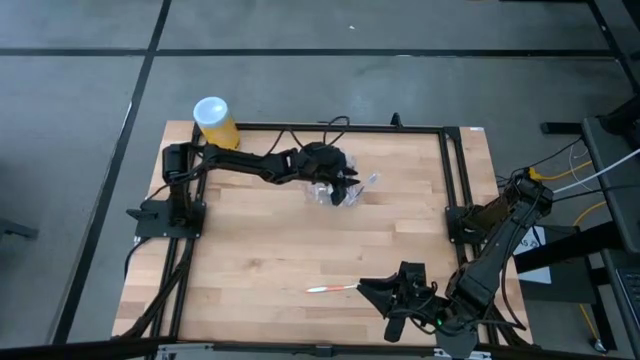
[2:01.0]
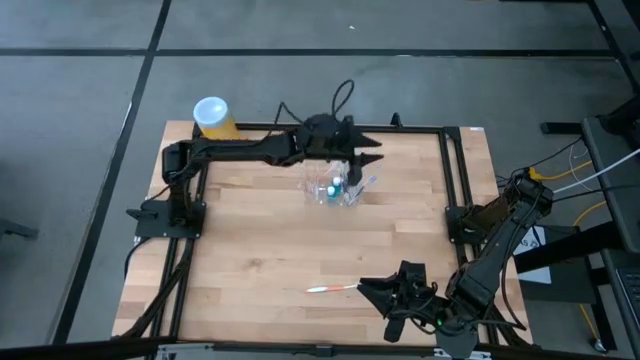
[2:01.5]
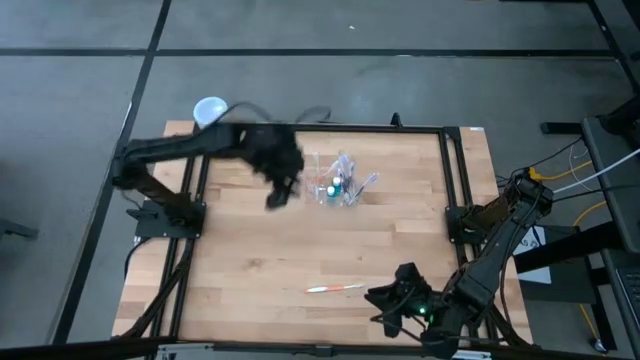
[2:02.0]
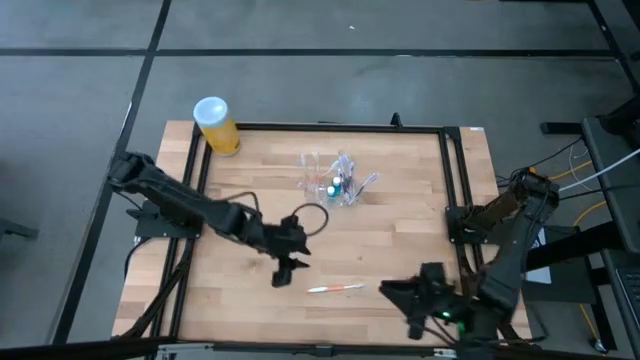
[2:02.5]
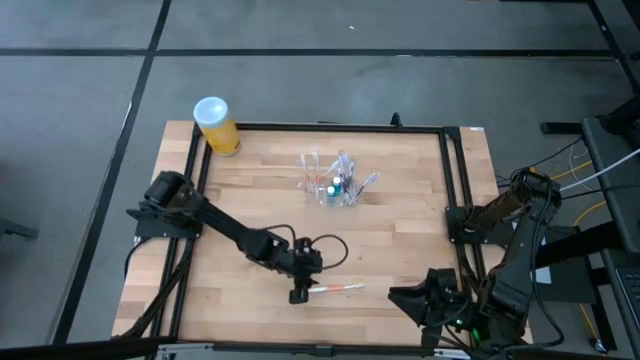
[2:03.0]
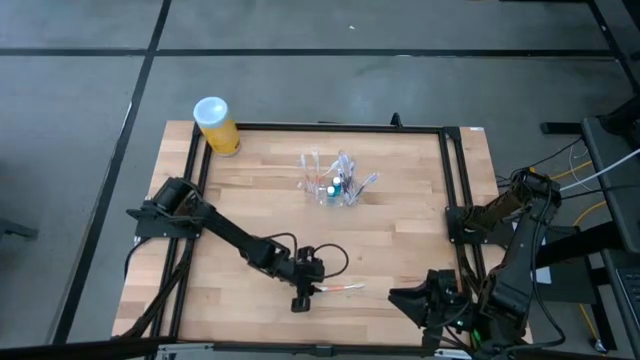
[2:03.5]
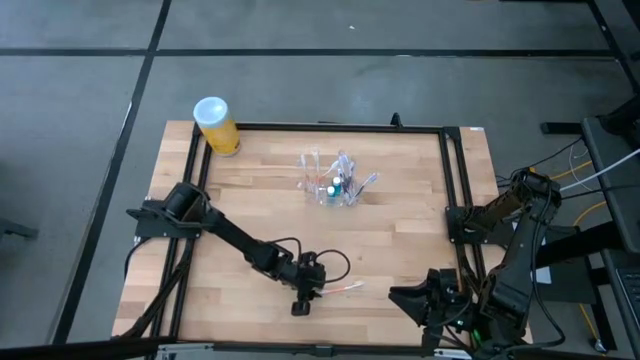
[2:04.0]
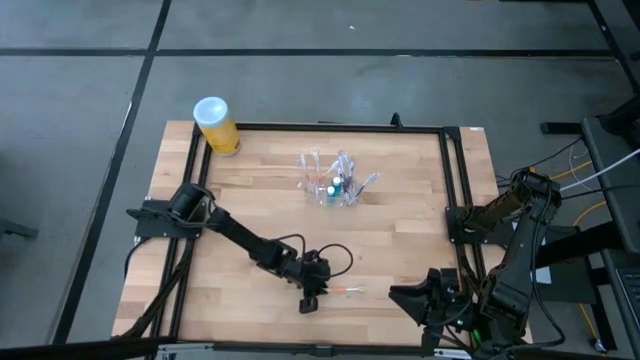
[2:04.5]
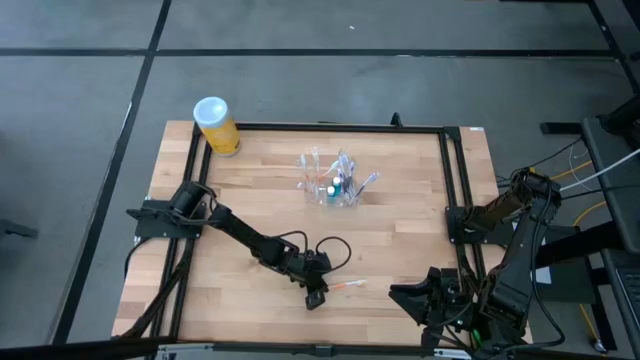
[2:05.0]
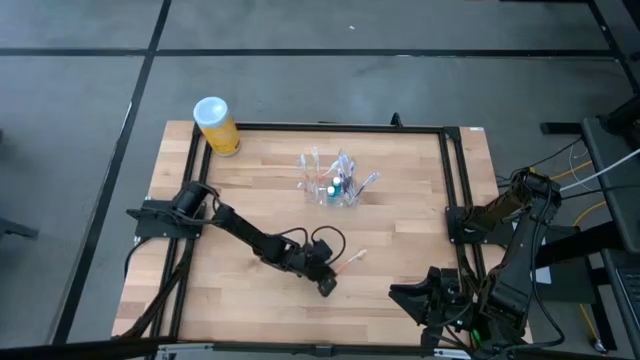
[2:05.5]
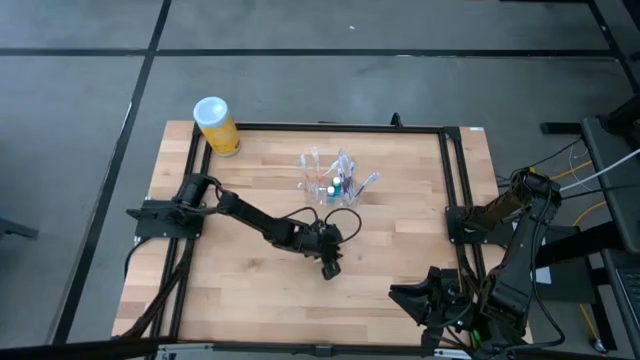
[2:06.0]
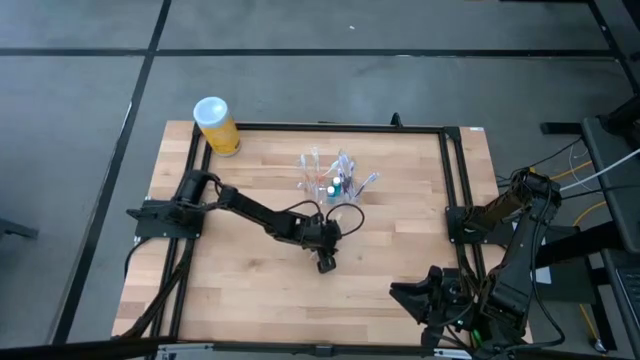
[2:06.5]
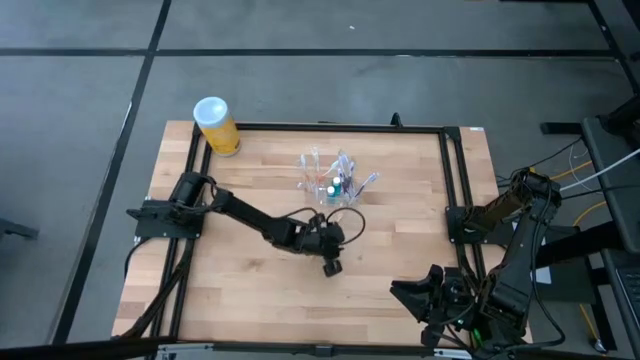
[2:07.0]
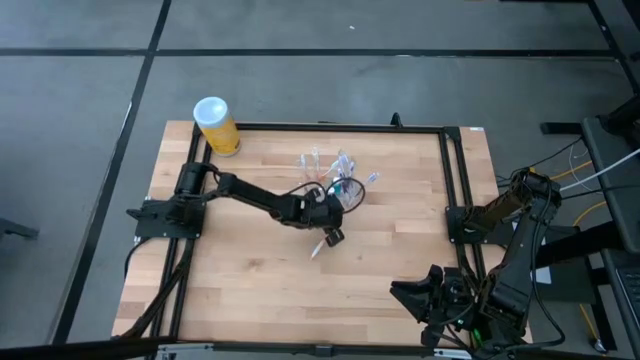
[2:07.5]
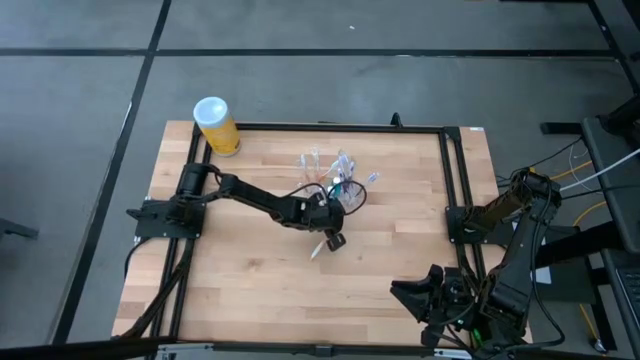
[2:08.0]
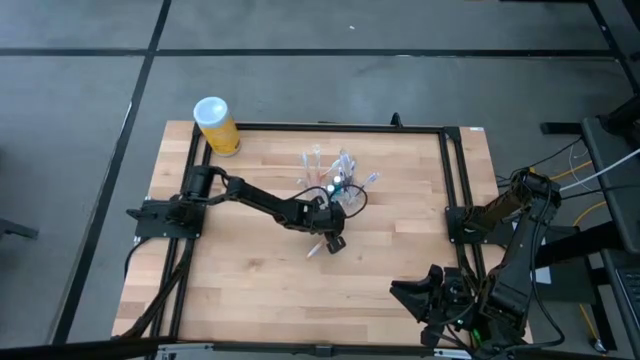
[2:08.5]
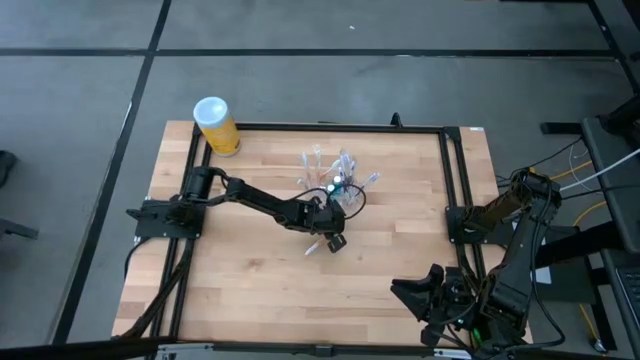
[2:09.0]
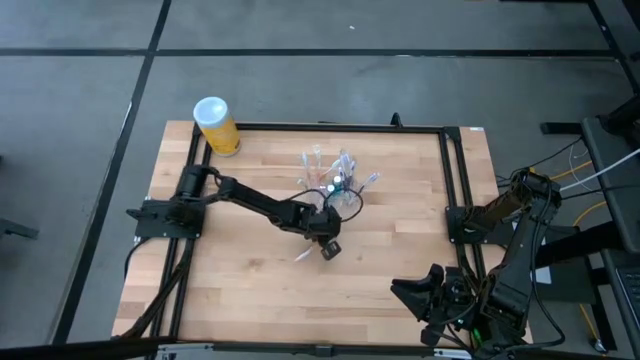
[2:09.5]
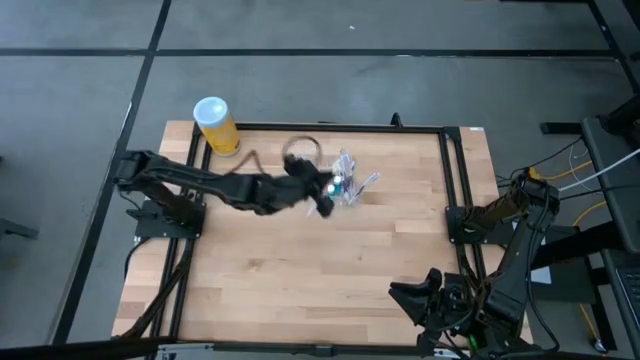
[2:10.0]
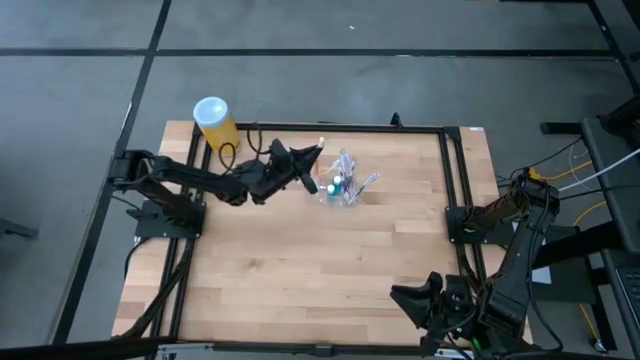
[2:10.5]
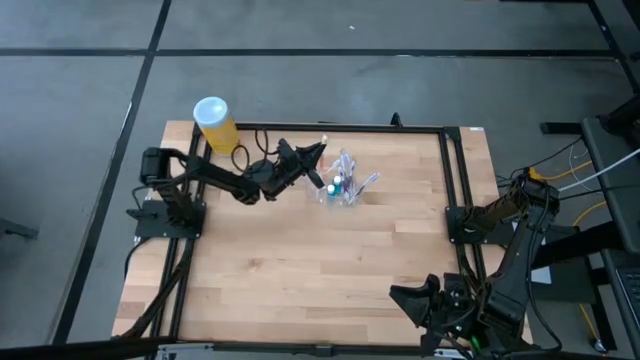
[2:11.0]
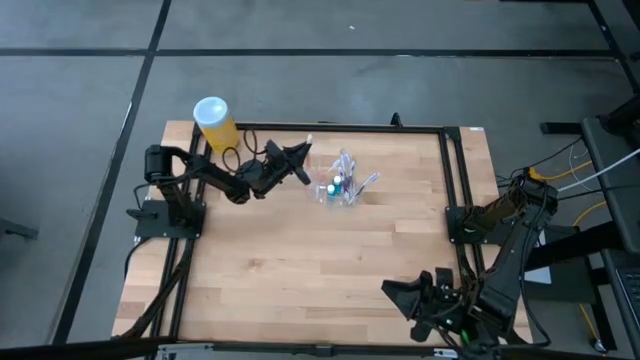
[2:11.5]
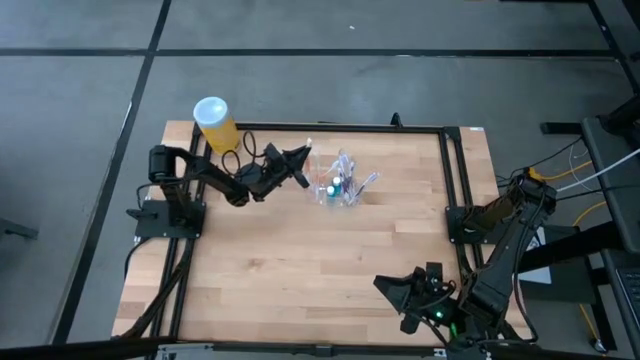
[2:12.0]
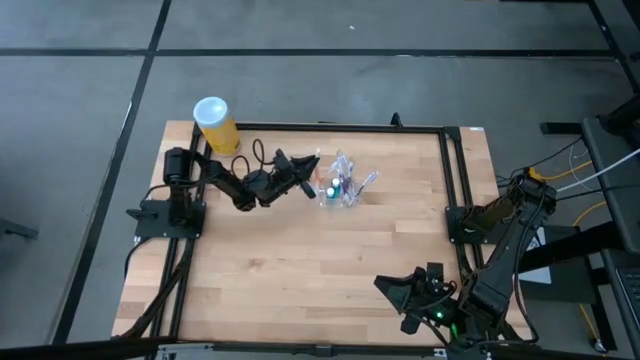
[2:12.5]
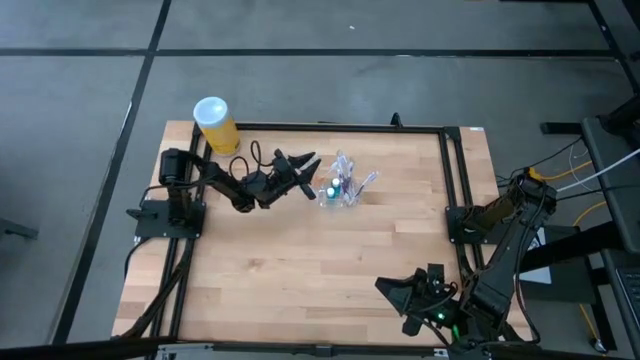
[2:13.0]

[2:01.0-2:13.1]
Task: Pick & Place toothbrushing station
Put the orange toothbrush into the transparent organizer

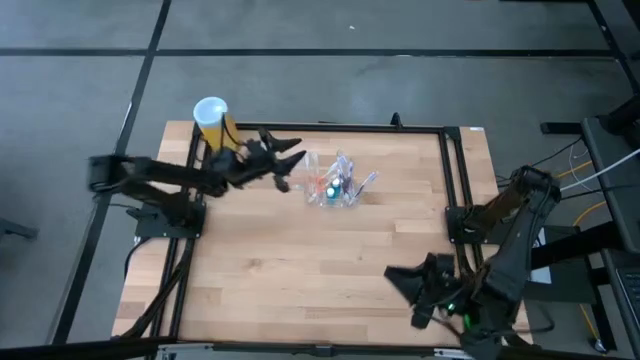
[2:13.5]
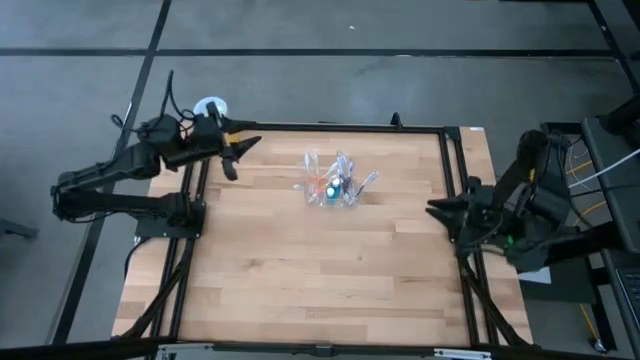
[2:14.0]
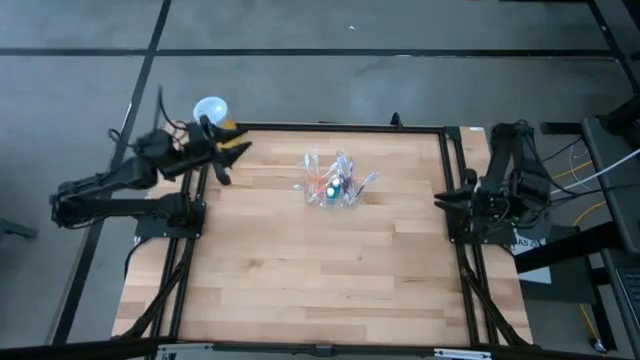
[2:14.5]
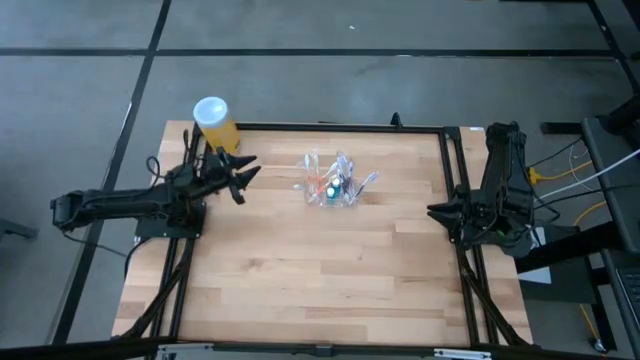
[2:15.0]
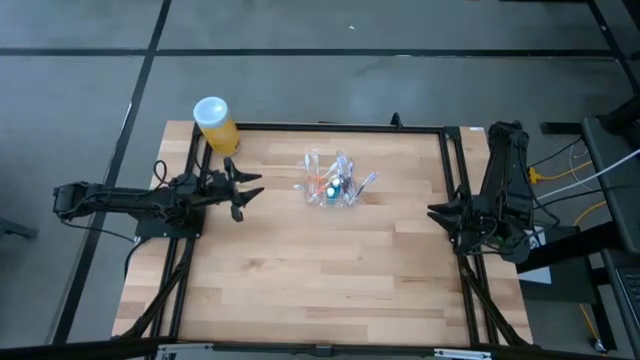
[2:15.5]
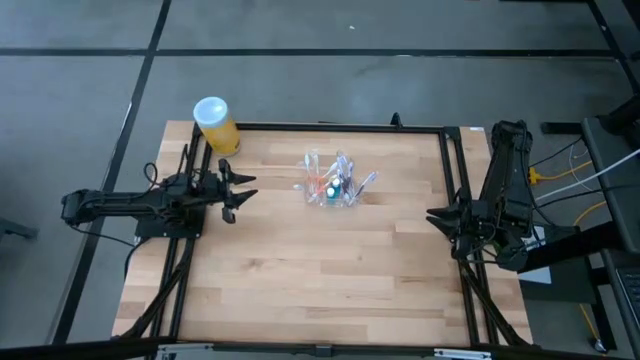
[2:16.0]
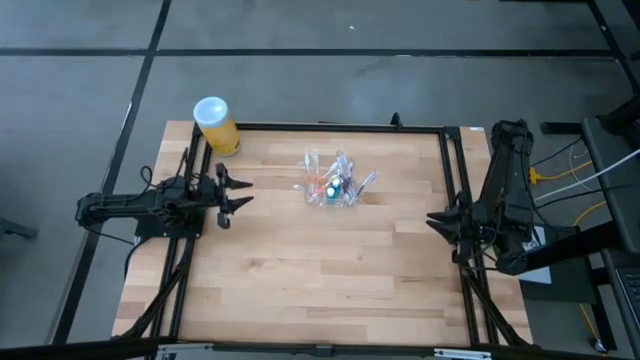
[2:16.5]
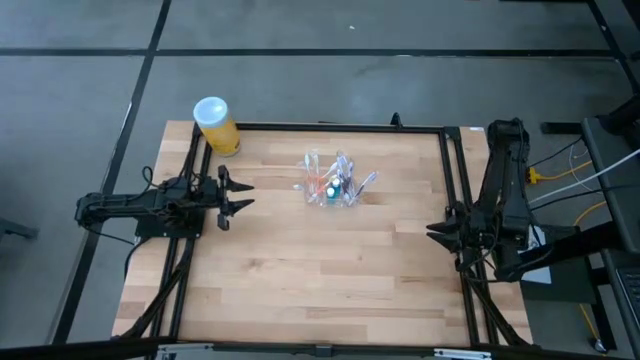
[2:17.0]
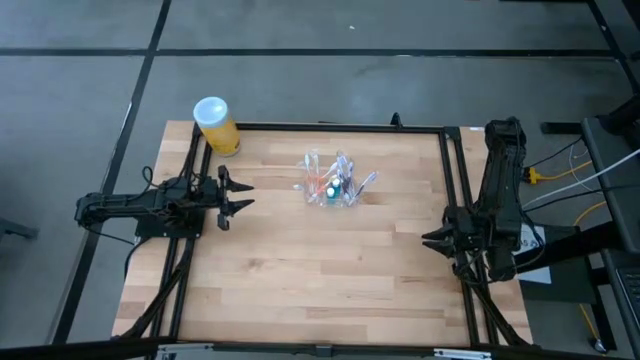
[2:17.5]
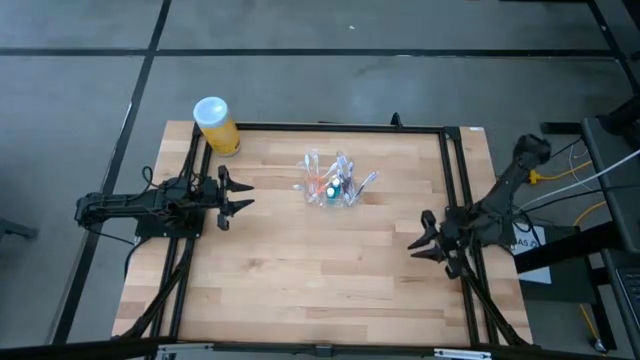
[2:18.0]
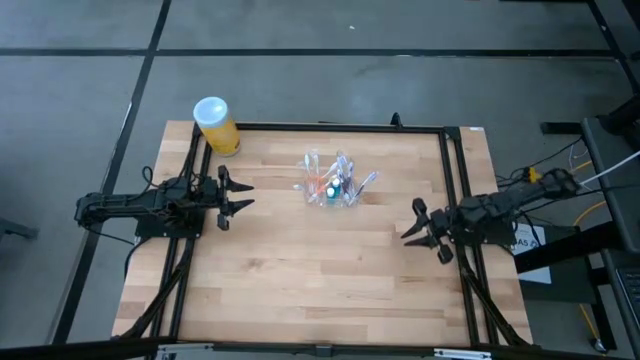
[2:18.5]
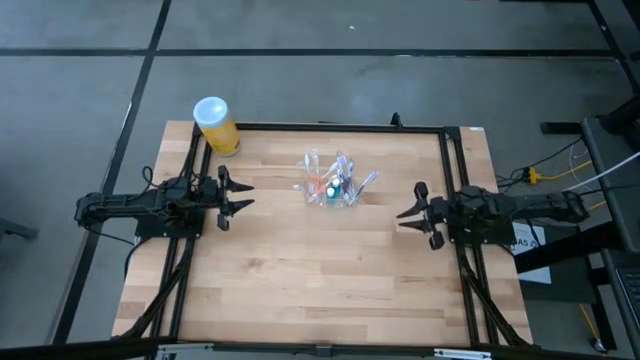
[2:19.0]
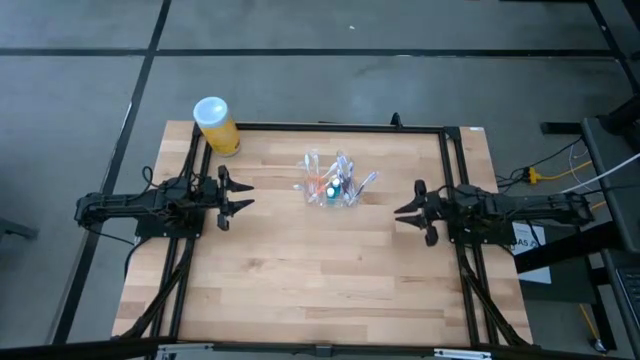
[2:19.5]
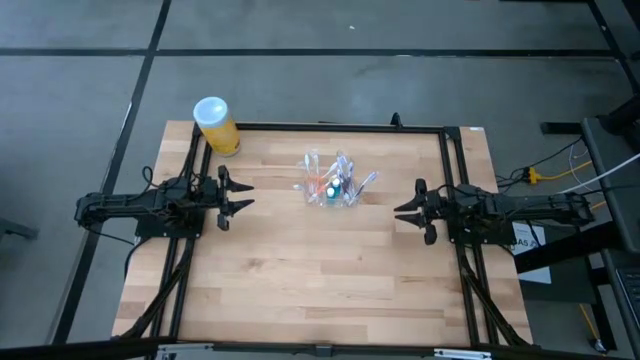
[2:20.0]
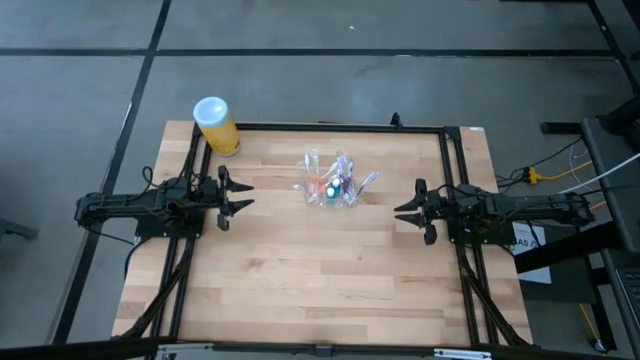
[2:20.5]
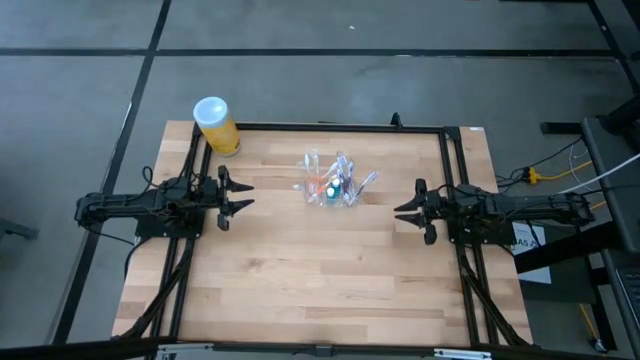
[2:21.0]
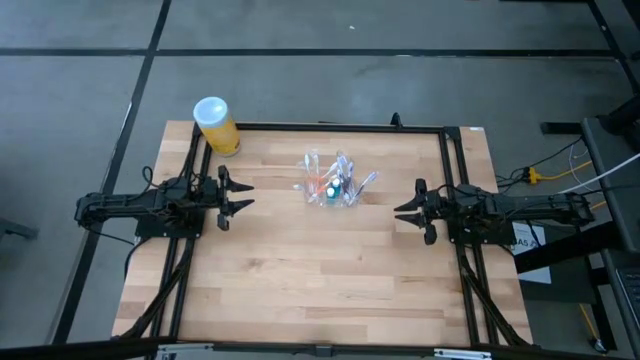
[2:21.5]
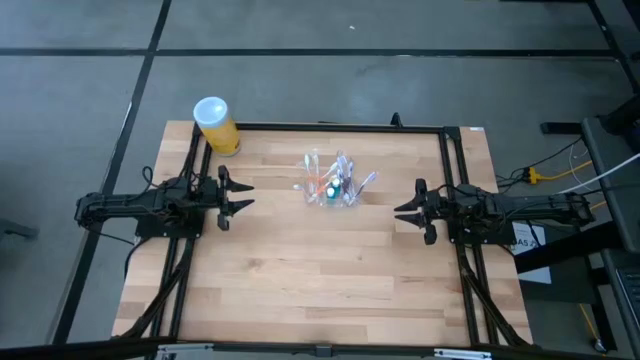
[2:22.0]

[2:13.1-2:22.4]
Return to Home Position
